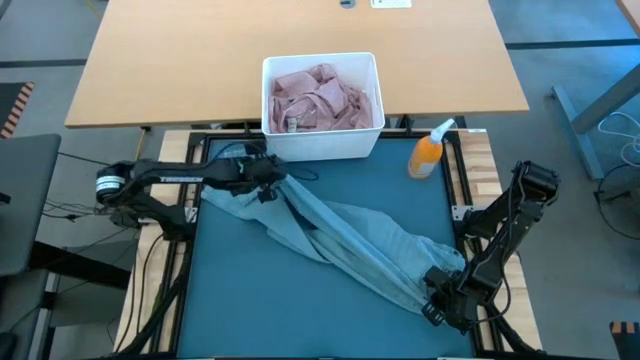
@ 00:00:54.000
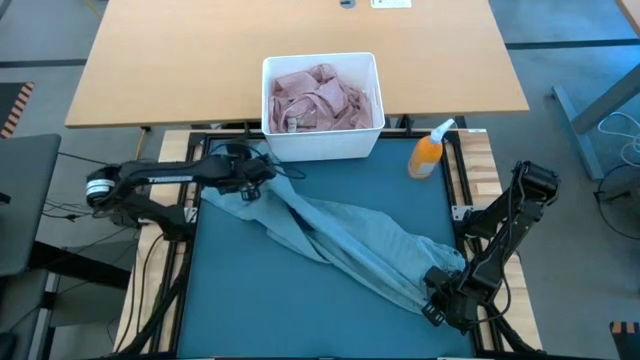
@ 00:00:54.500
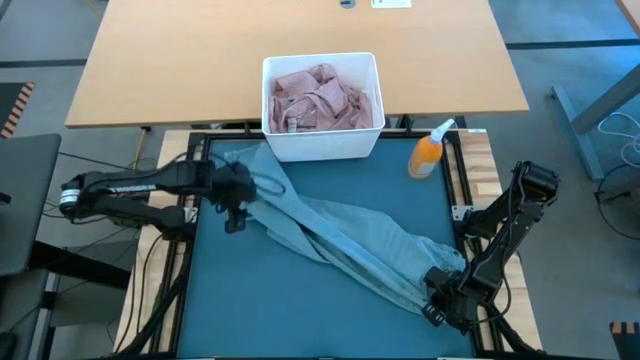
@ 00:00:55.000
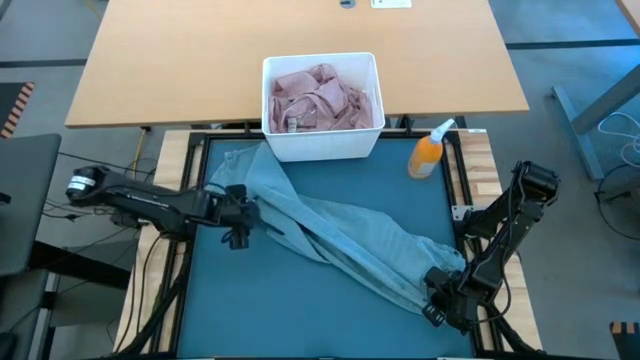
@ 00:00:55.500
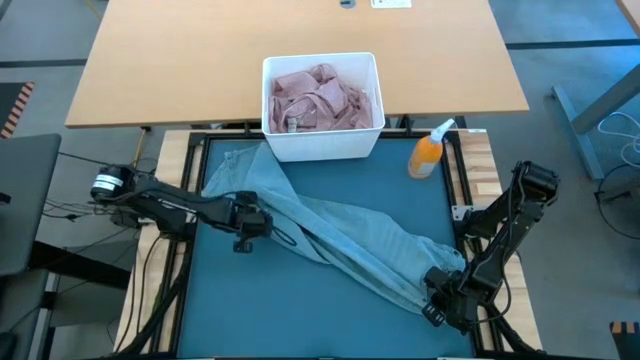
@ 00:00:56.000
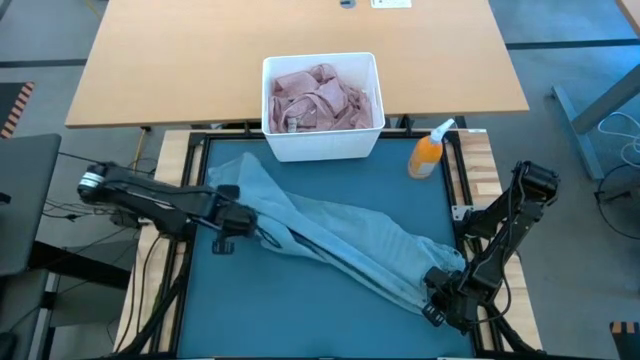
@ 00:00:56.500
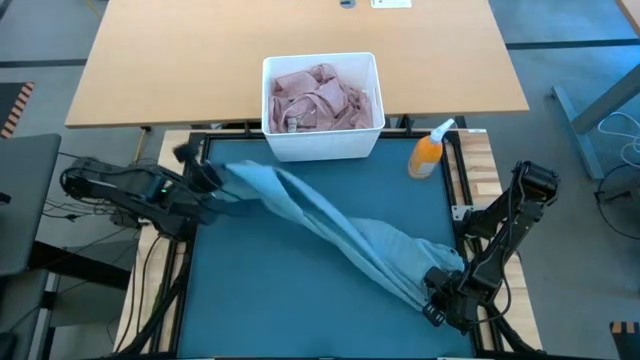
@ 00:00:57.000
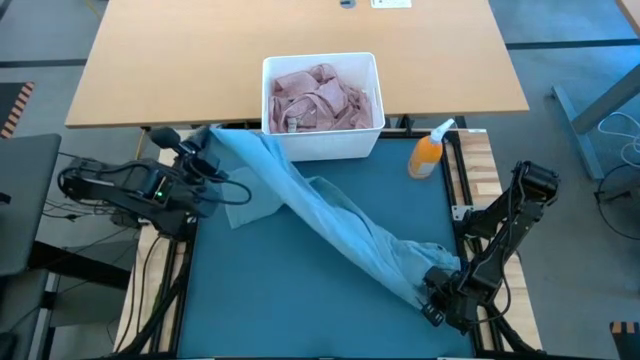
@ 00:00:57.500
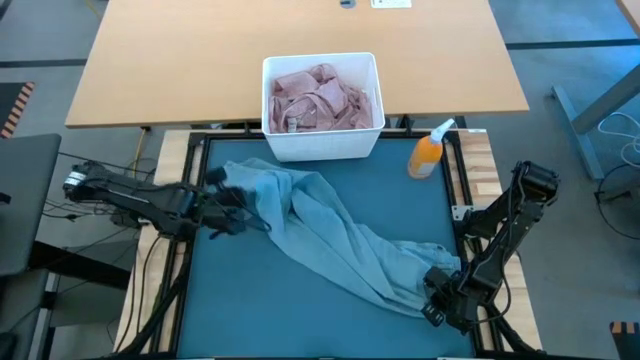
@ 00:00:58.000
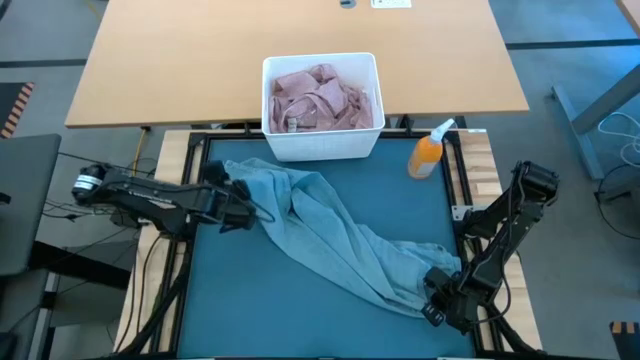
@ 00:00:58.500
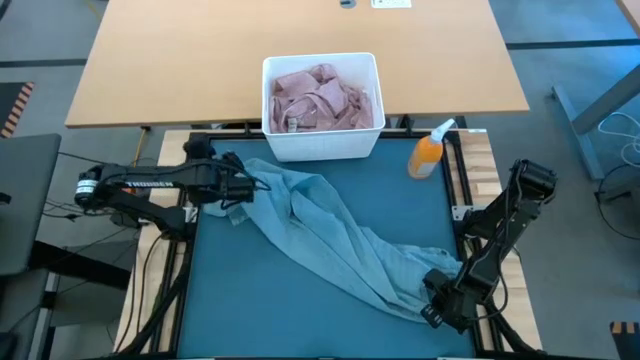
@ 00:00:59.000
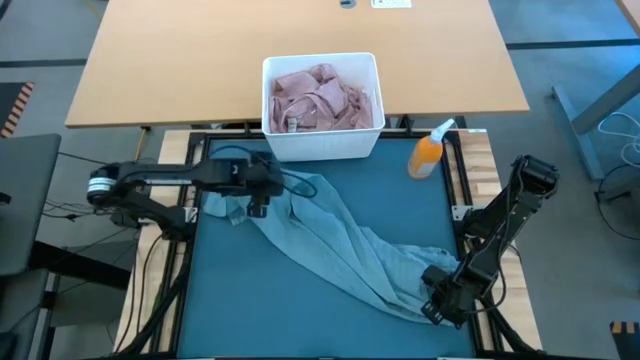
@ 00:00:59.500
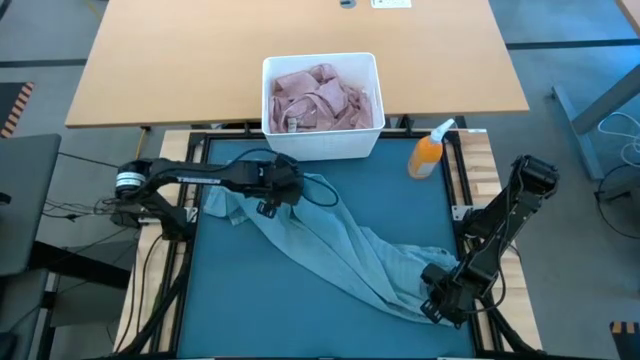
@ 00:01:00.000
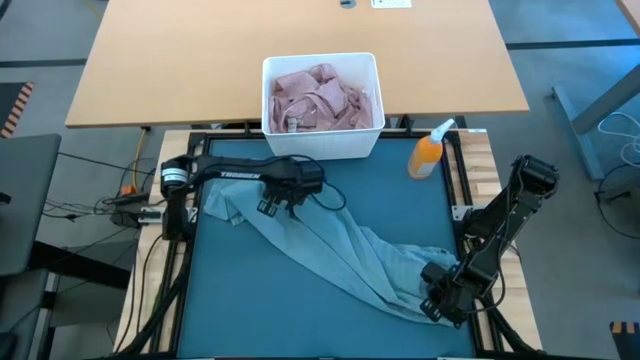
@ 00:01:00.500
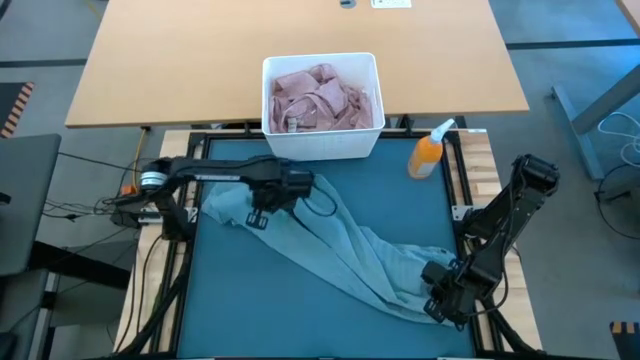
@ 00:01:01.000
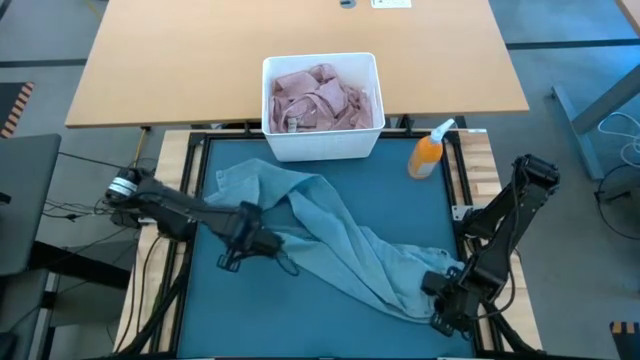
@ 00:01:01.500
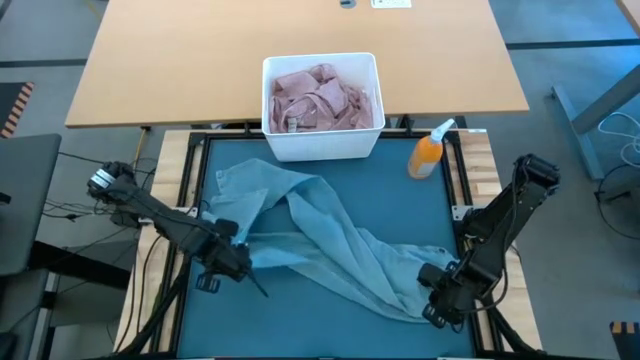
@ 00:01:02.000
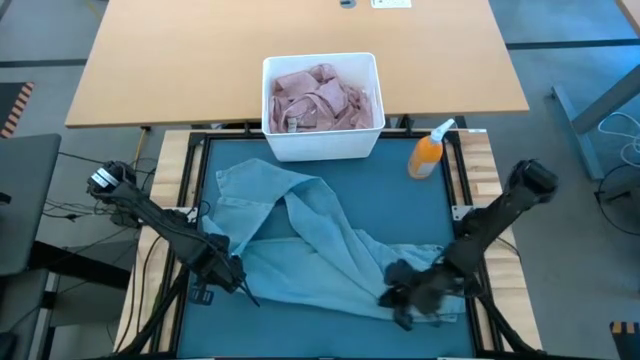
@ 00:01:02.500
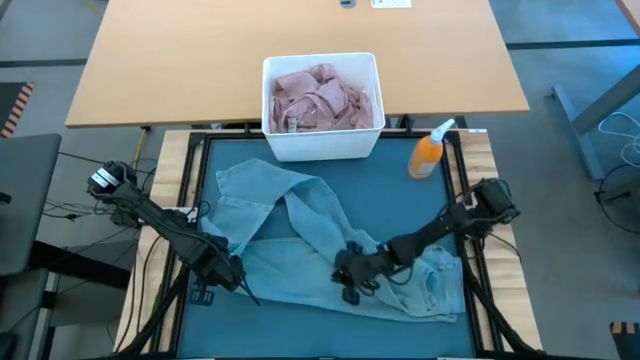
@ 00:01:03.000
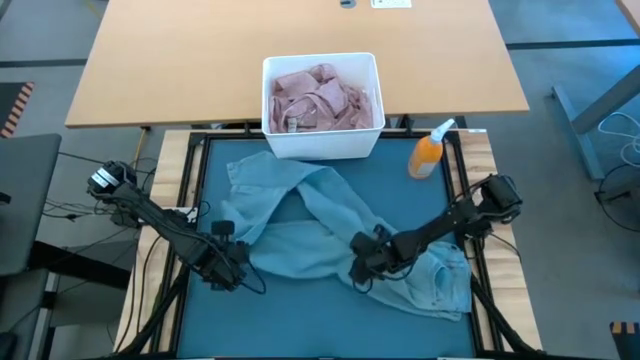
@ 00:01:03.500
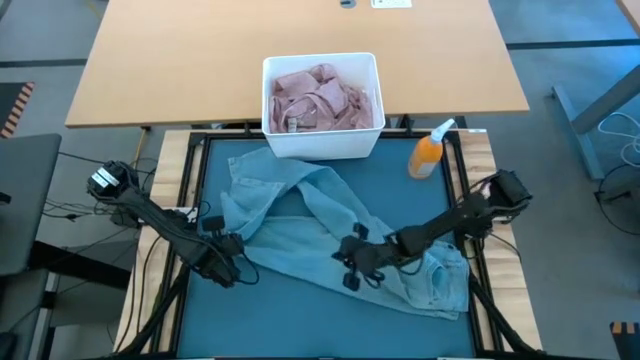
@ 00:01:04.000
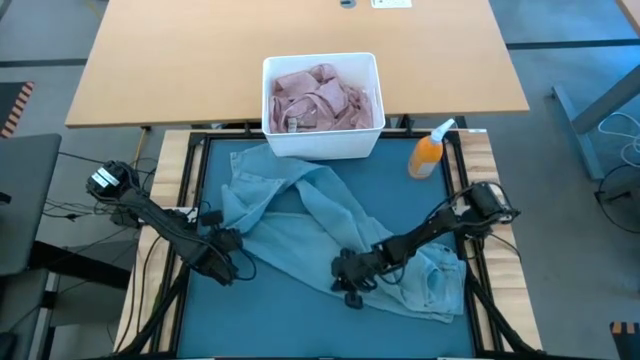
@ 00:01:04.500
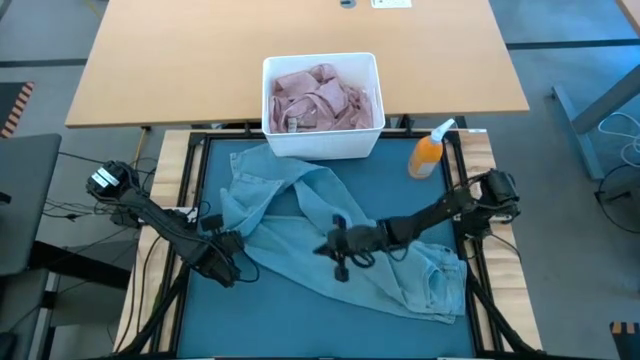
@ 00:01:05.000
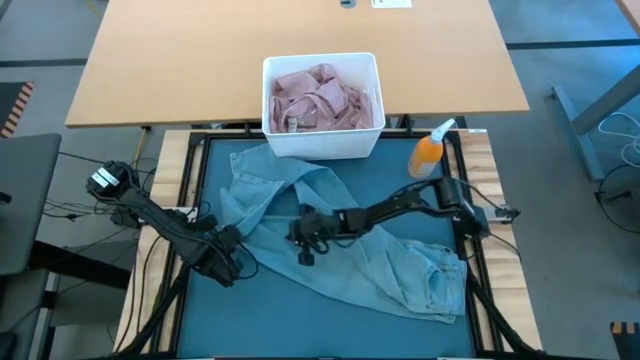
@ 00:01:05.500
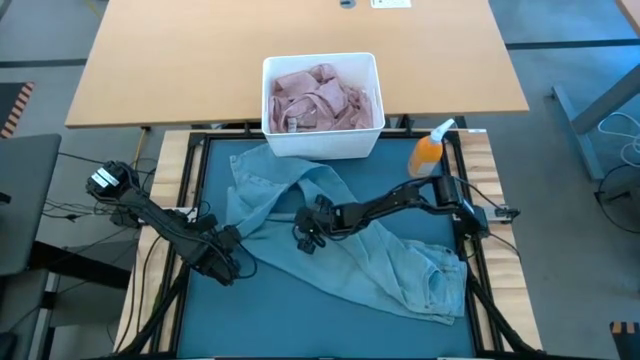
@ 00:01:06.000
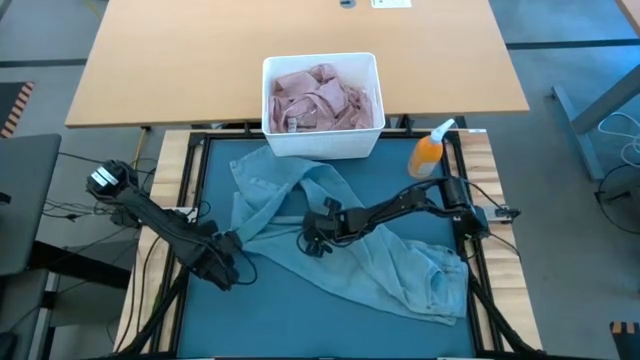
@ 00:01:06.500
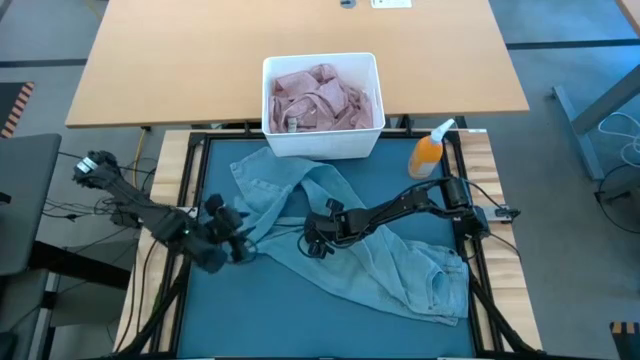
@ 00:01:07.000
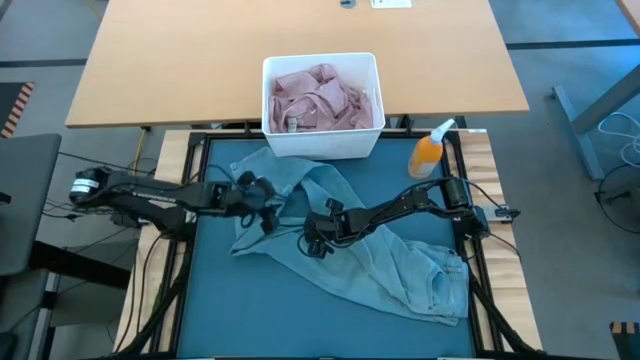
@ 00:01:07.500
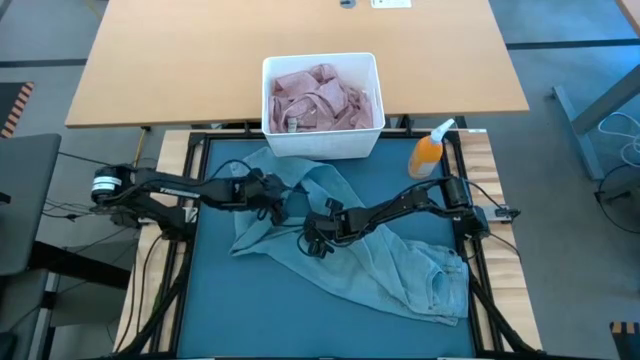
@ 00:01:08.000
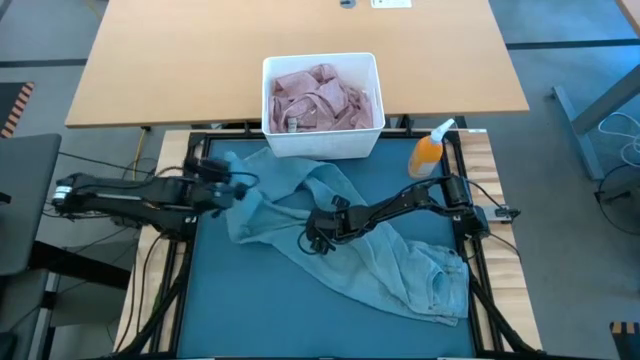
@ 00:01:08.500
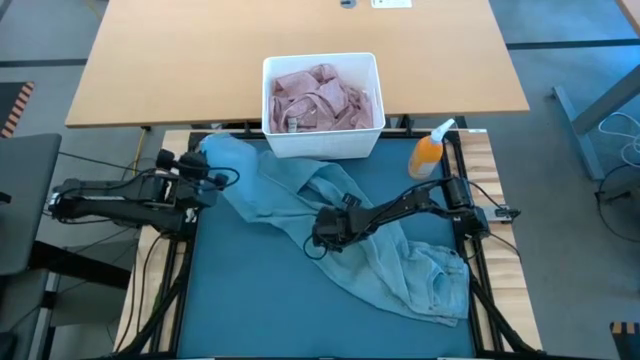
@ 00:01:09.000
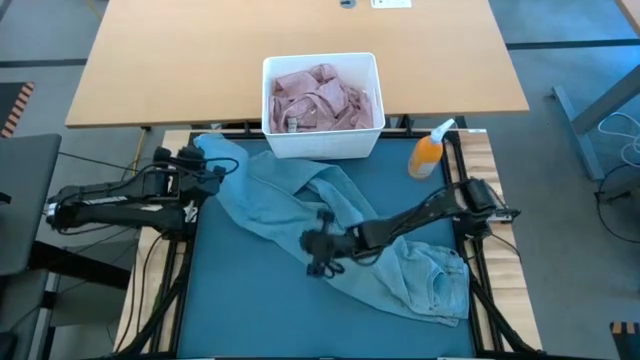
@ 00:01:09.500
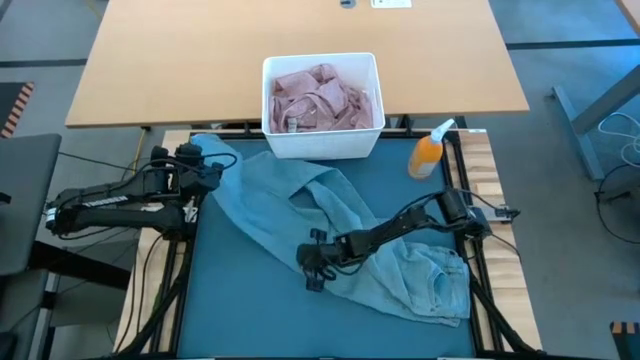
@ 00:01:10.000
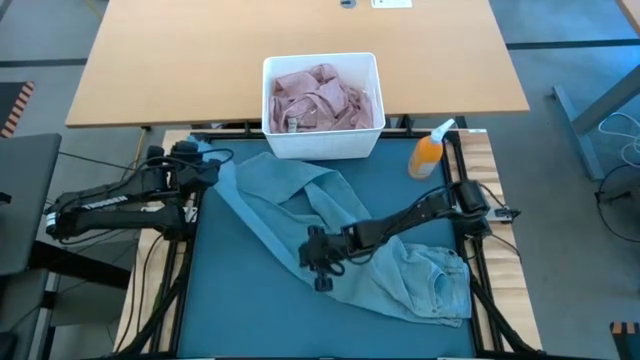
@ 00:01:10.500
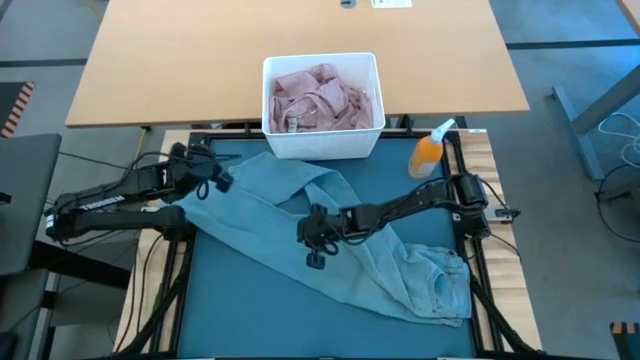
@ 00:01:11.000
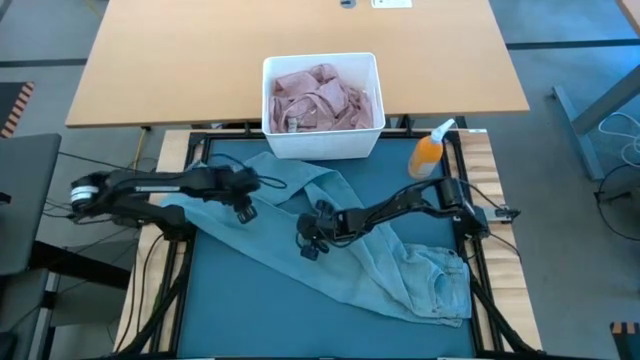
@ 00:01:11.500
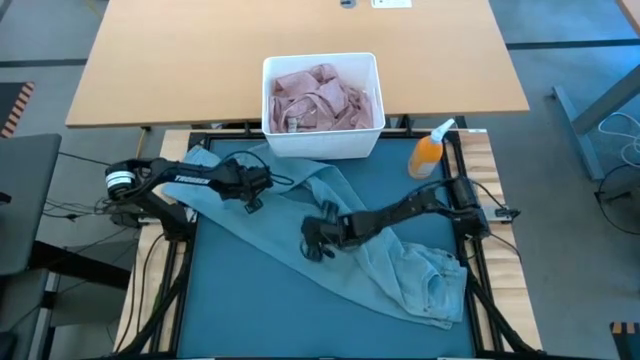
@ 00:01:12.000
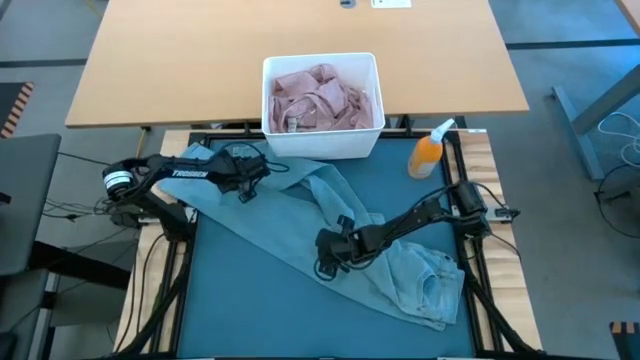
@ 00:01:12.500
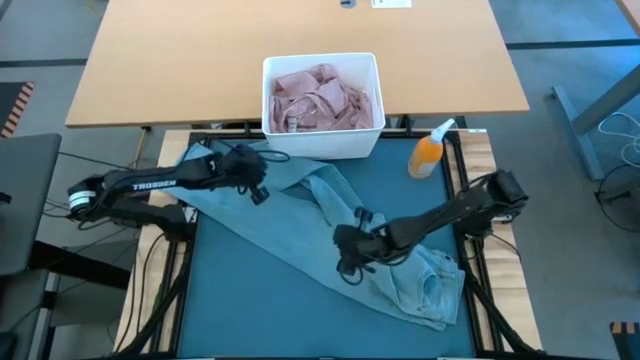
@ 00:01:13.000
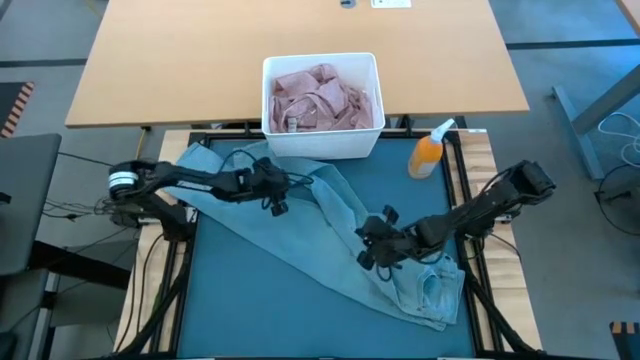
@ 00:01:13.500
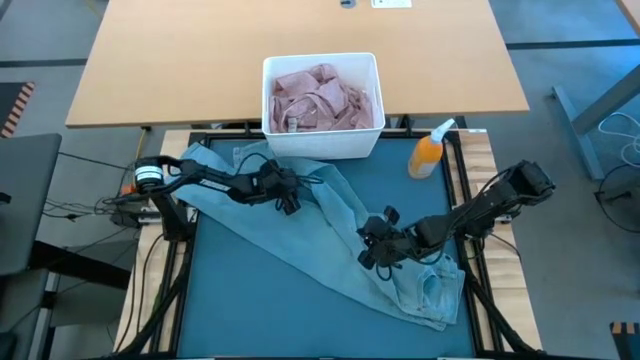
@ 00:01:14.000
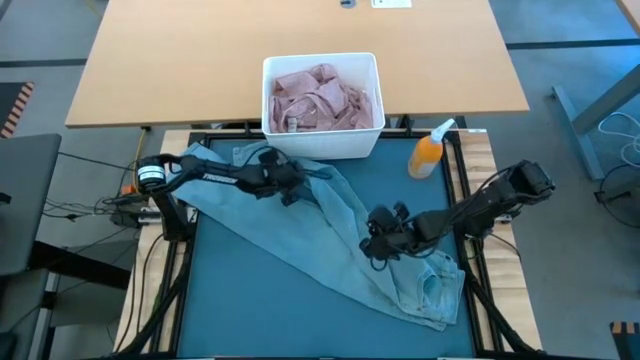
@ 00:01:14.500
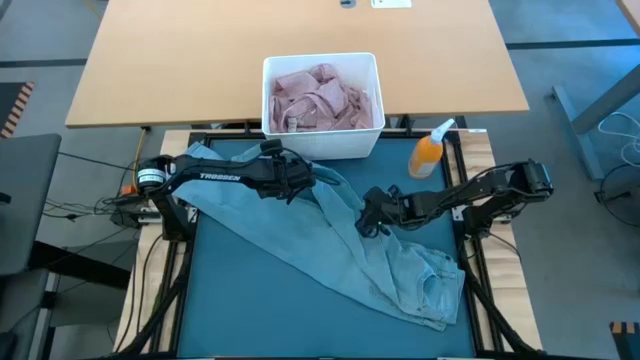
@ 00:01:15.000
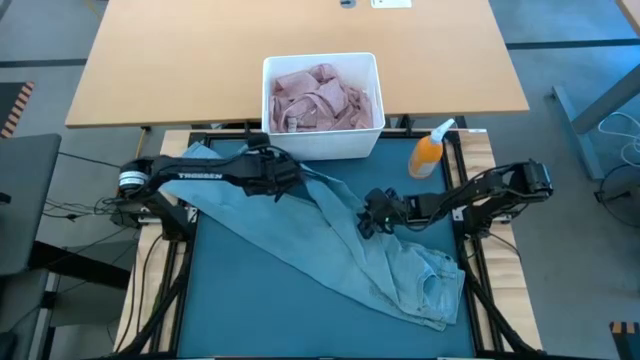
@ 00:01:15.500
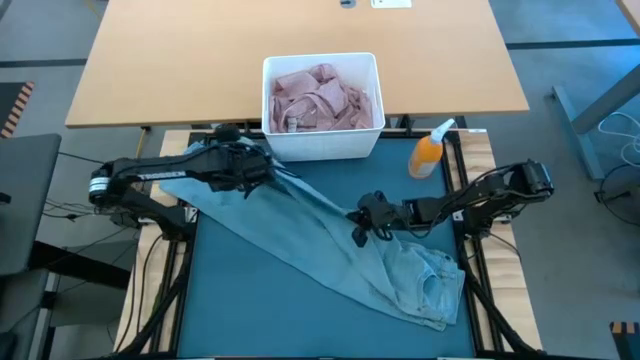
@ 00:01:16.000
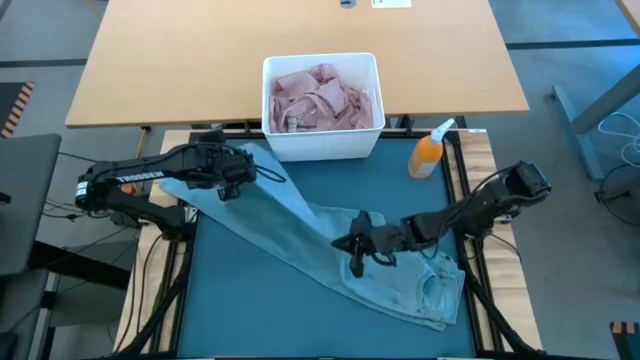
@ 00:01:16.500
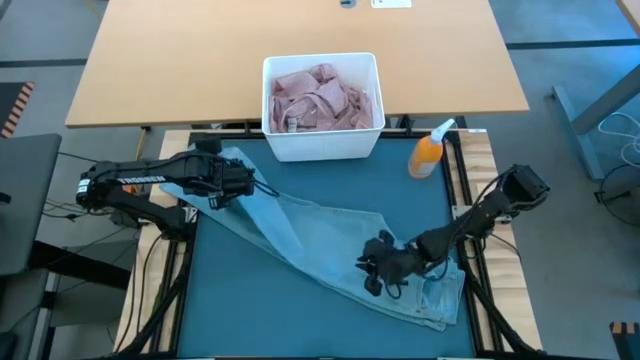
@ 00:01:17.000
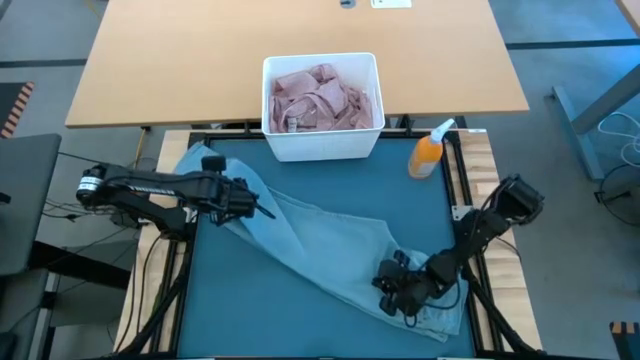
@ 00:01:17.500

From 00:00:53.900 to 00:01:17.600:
Task: Fold Laundry from Bin
Fold the blue pants
